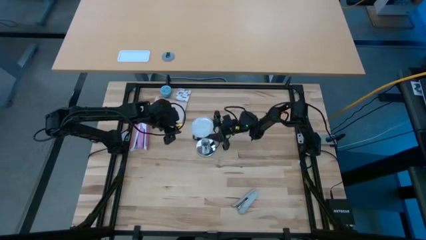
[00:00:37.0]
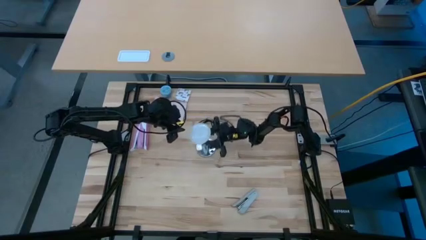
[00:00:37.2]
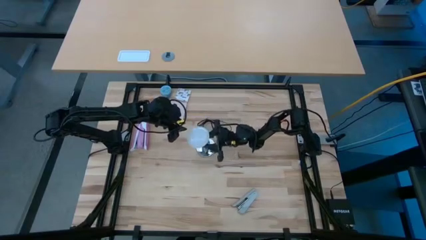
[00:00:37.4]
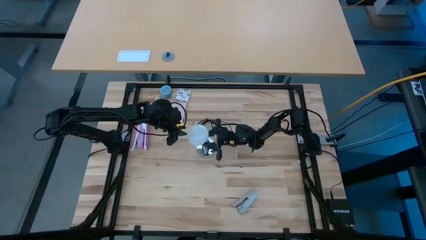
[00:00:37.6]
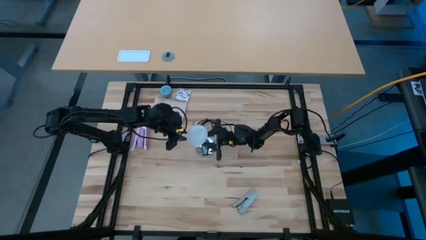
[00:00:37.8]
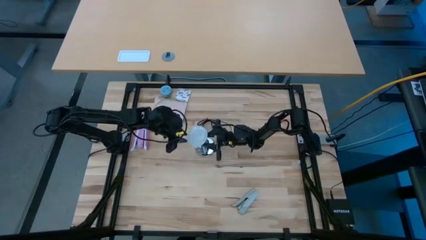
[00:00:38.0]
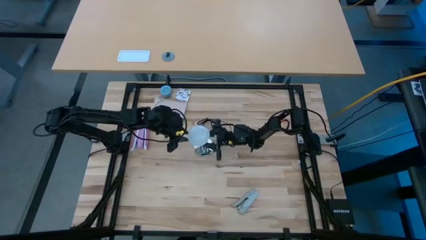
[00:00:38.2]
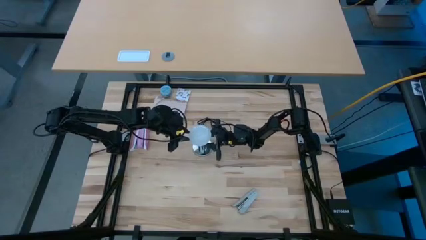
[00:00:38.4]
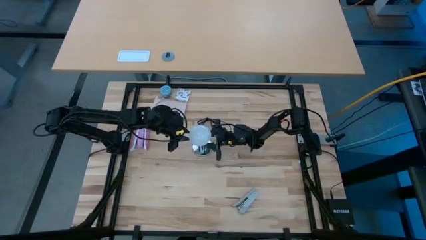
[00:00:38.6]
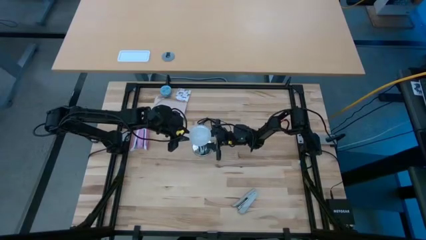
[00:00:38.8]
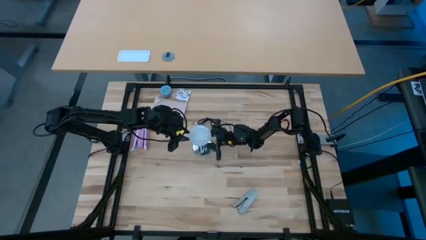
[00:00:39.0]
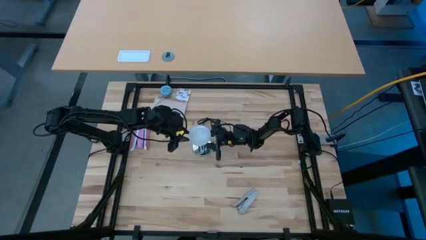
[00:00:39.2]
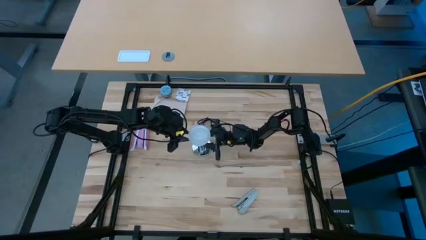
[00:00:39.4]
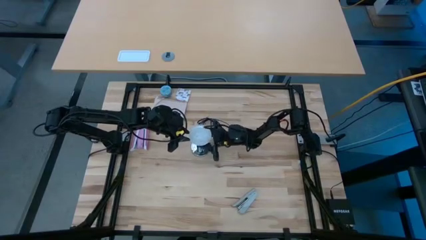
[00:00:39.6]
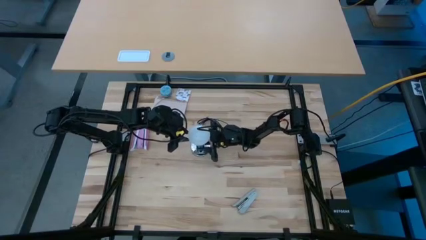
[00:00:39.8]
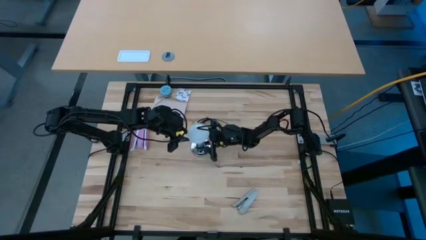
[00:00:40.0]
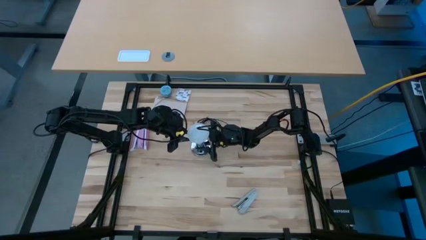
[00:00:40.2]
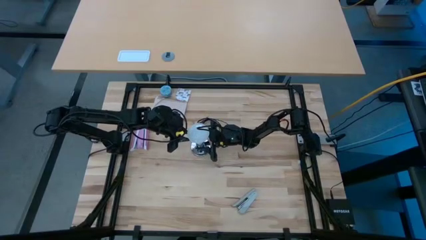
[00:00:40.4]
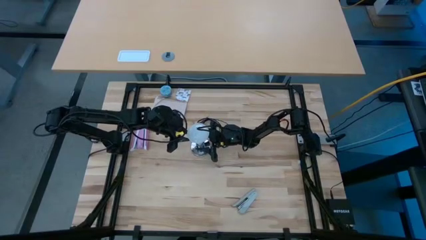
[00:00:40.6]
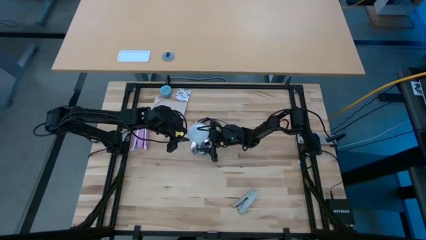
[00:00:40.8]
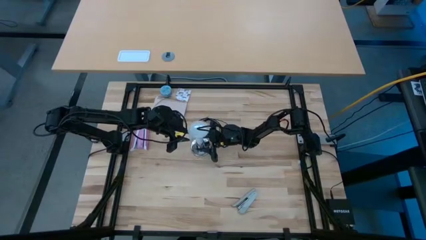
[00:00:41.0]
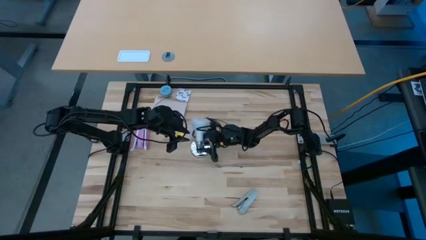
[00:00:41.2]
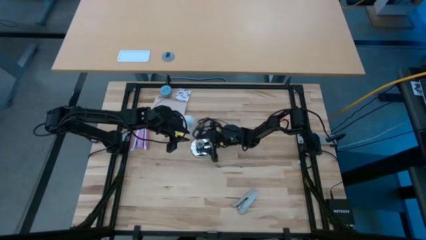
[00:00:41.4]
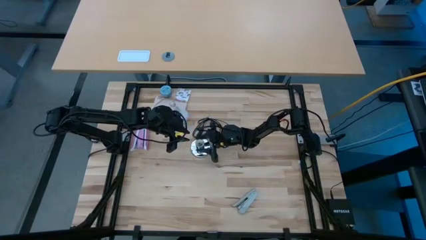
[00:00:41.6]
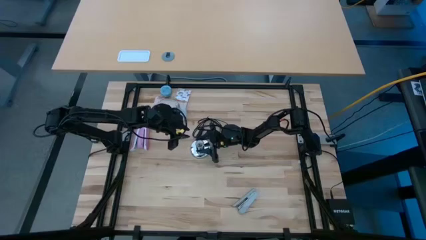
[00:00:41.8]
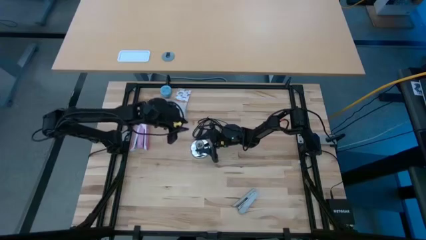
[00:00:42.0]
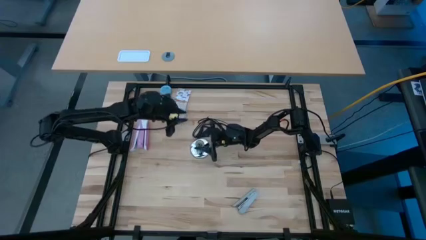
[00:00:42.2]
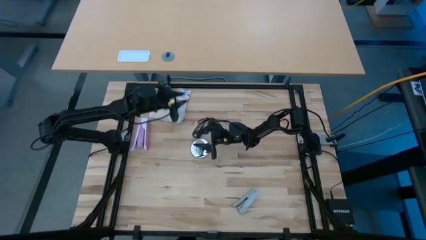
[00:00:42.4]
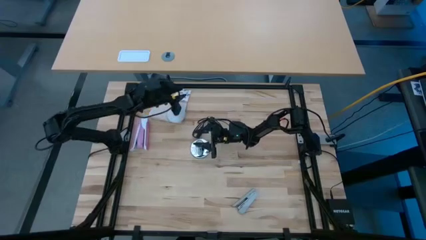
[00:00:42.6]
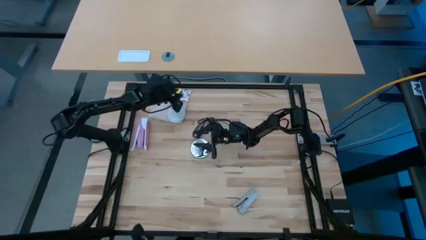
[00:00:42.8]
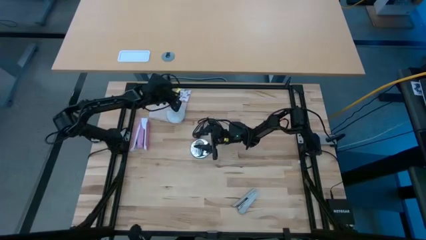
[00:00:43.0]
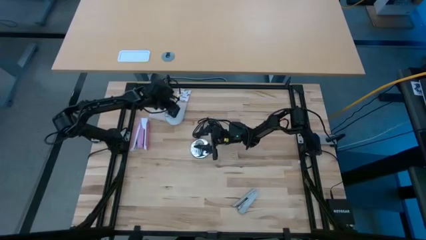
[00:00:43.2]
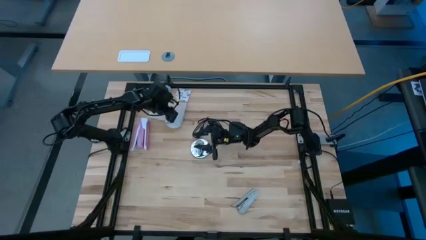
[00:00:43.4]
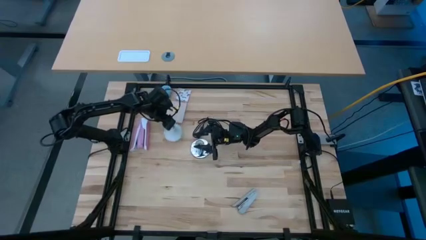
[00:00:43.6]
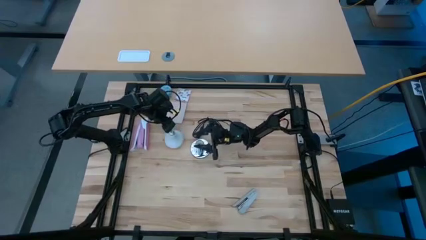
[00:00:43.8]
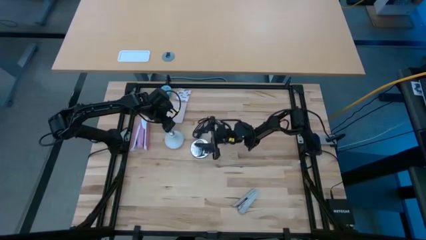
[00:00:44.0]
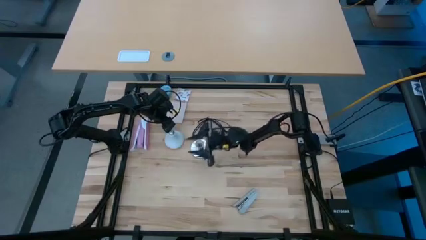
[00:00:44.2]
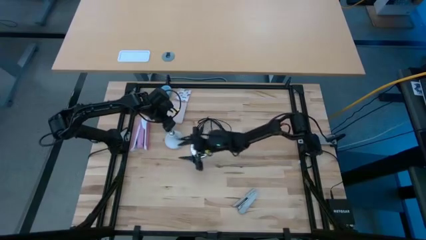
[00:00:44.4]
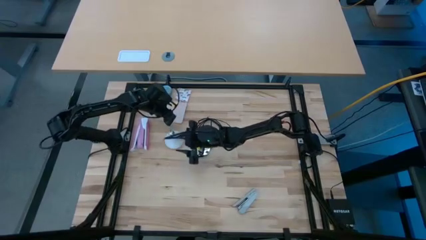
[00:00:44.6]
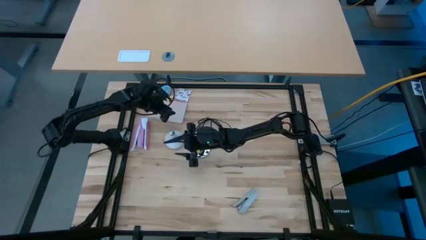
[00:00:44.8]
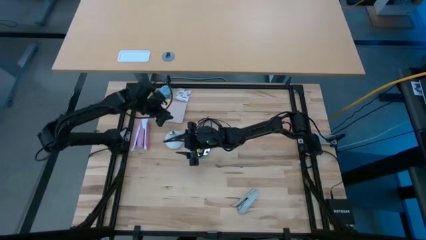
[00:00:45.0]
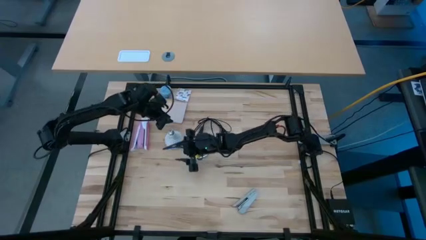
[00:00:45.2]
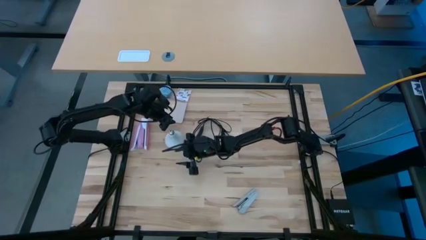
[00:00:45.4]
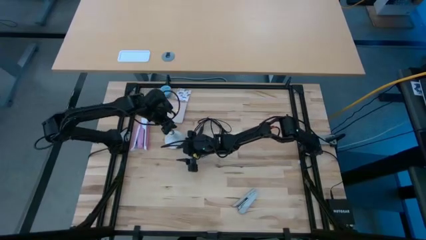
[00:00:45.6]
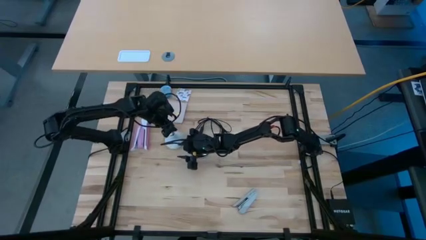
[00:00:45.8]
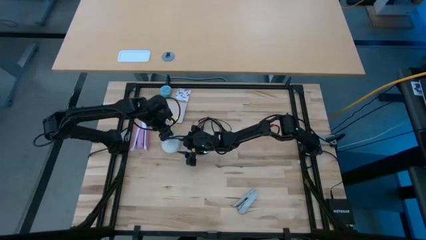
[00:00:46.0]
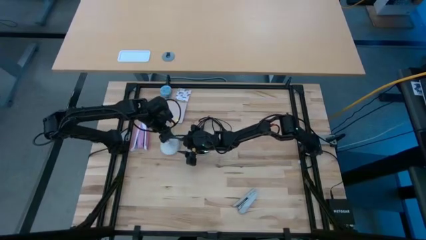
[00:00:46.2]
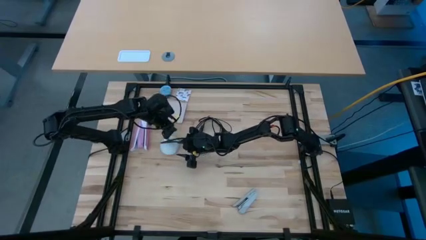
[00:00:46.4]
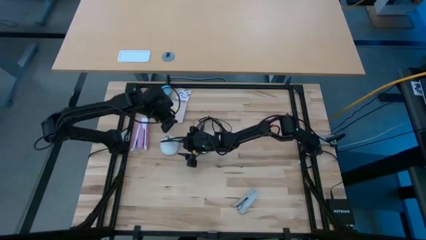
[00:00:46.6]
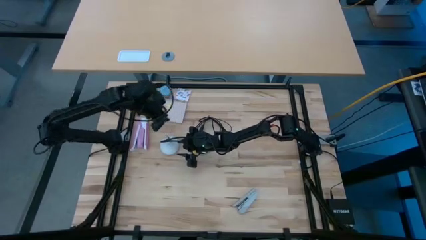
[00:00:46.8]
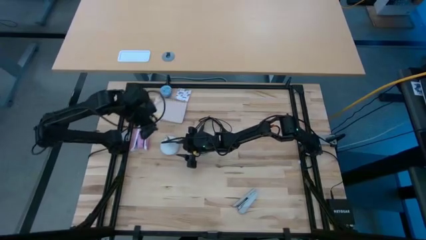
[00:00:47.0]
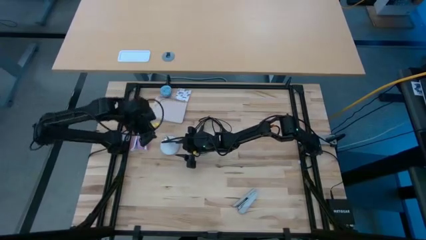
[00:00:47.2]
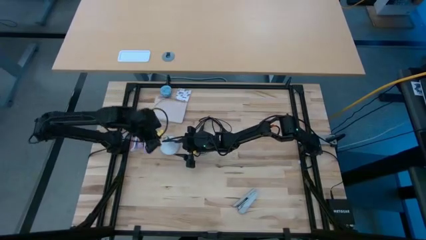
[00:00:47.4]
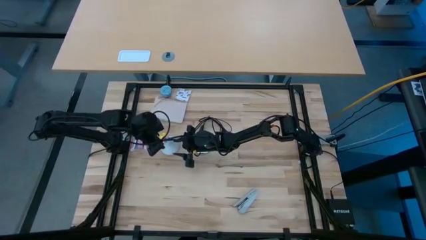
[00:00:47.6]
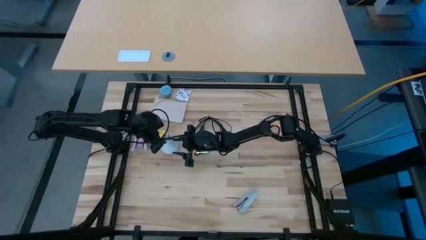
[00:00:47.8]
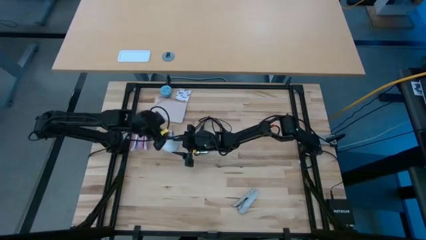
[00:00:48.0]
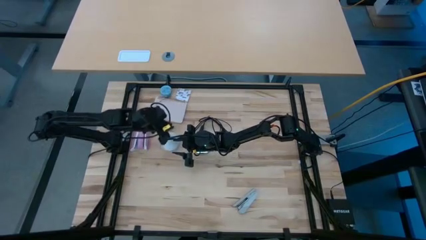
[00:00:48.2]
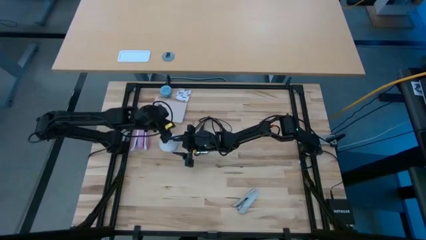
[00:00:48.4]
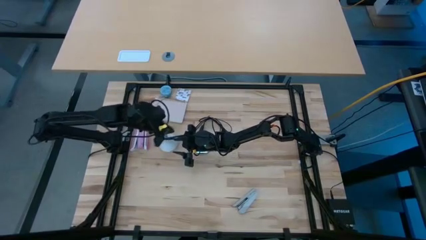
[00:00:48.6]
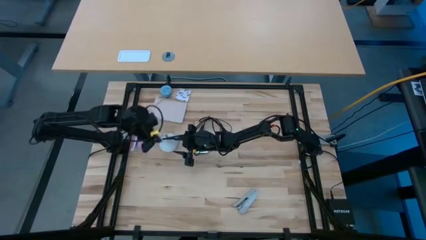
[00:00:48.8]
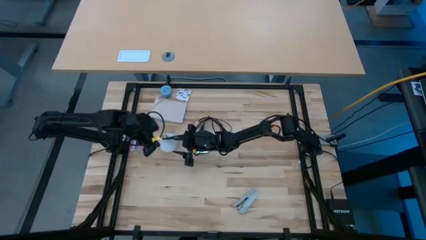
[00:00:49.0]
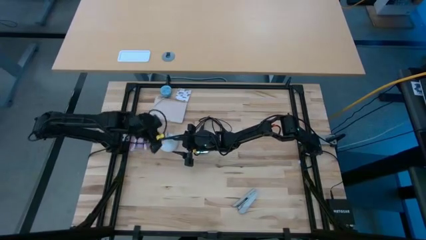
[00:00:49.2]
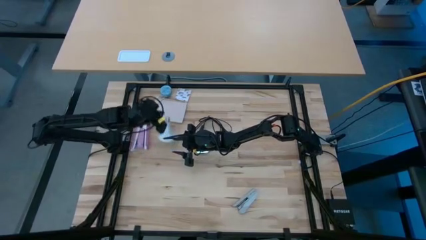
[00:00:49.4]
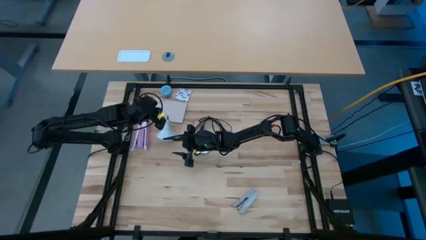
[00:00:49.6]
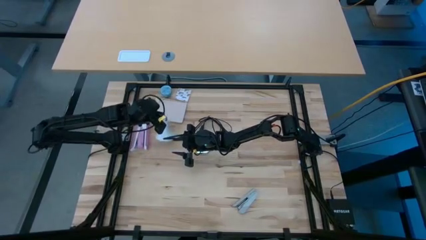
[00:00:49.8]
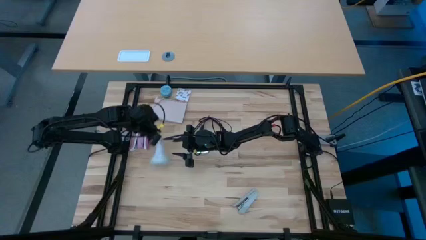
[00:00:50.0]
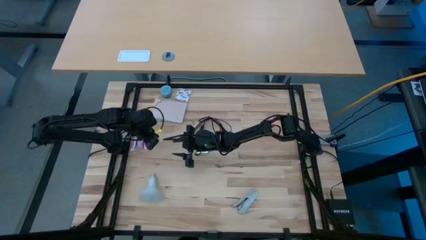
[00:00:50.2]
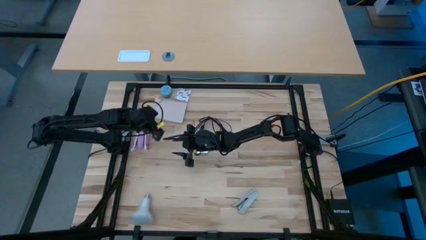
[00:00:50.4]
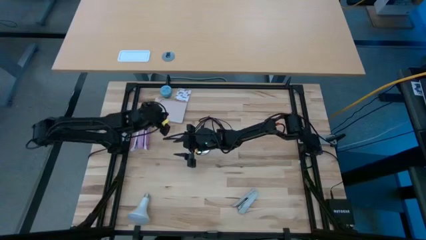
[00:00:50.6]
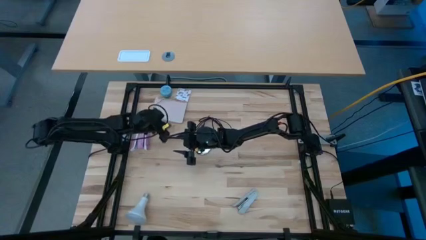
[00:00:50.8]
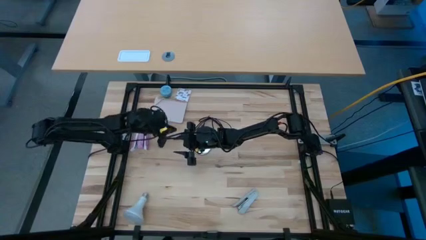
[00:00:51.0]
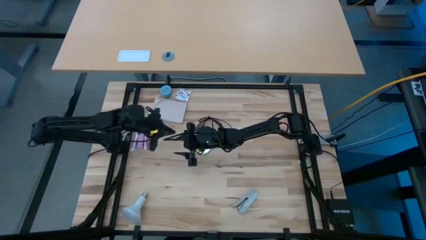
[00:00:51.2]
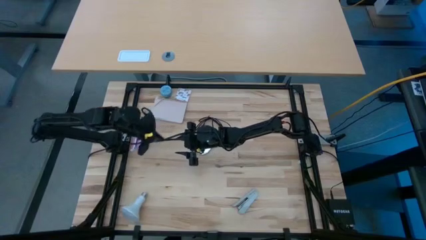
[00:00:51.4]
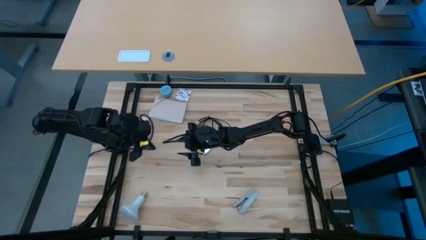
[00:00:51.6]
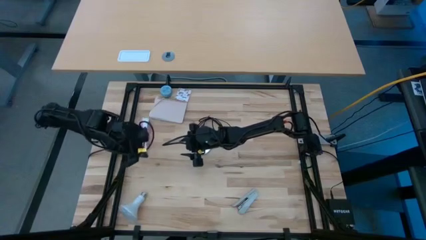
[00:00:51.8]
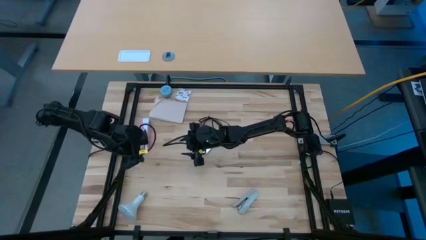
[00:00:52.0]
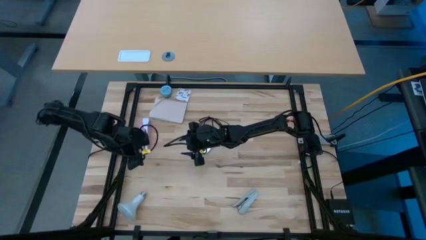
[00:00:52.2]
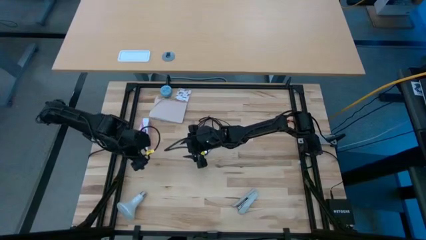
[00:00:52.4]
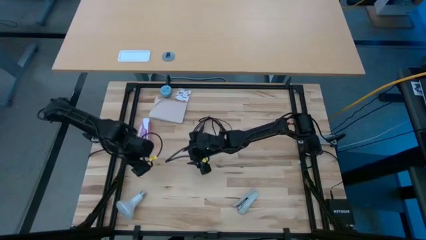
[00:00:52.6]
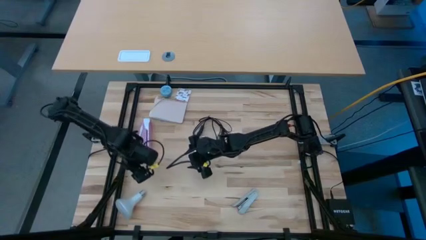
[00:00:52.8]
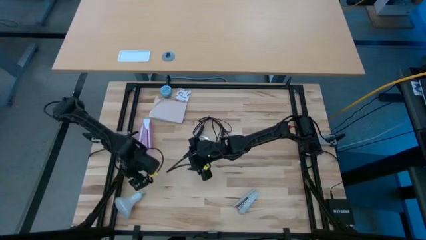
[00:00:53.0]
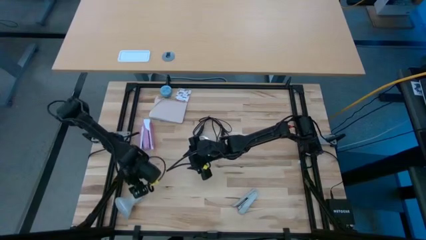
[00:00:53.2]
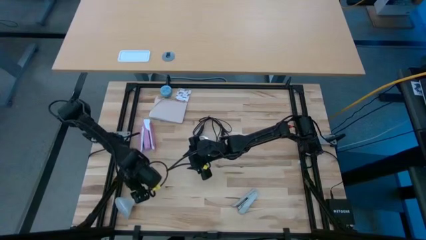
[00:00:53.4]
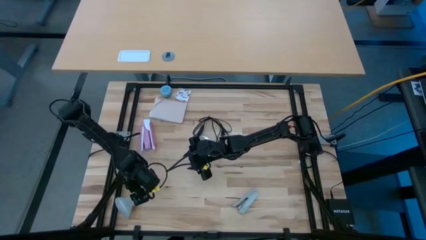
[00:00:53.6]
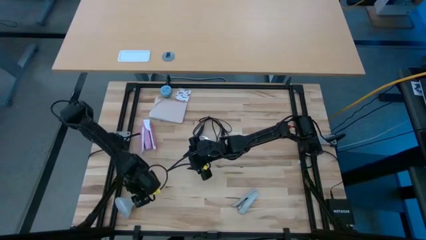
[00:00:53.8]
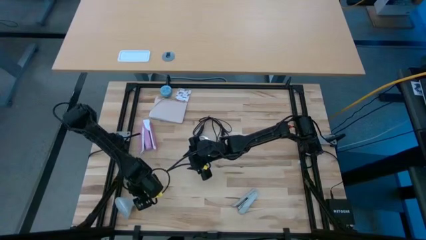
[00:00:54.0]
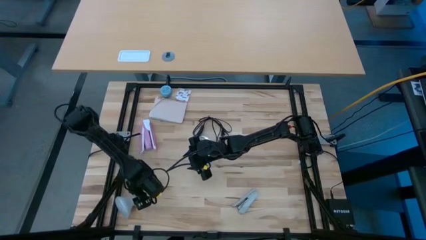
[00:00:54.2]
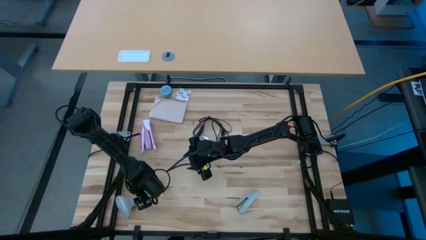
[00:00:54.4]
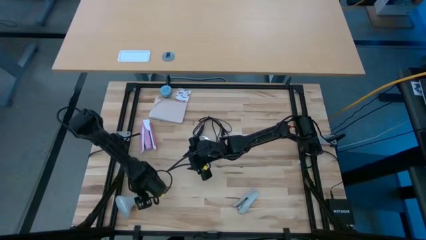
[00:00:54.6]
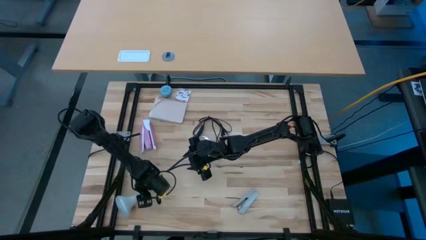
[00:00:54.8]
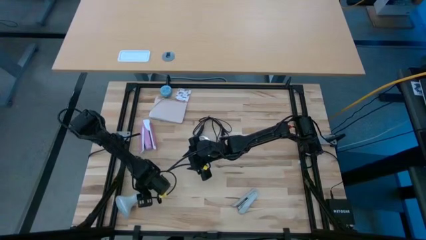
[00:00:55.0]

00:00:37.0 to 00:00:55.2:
Task: Screw lightbulb
Insert the light bulb into the lamp
